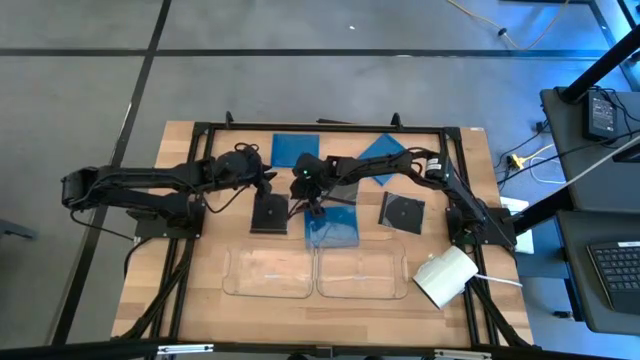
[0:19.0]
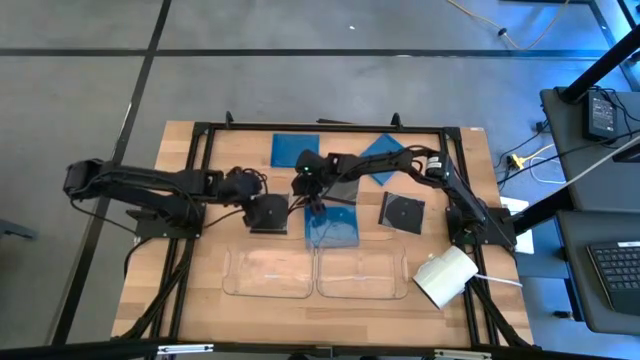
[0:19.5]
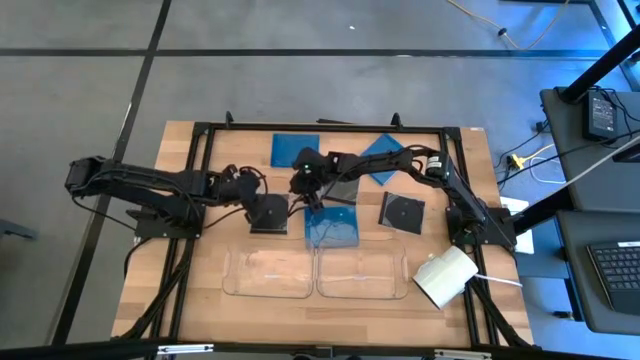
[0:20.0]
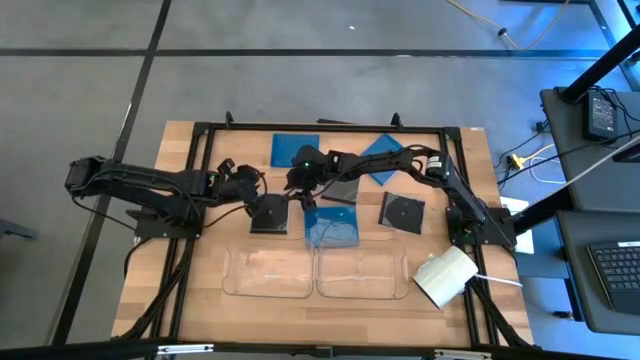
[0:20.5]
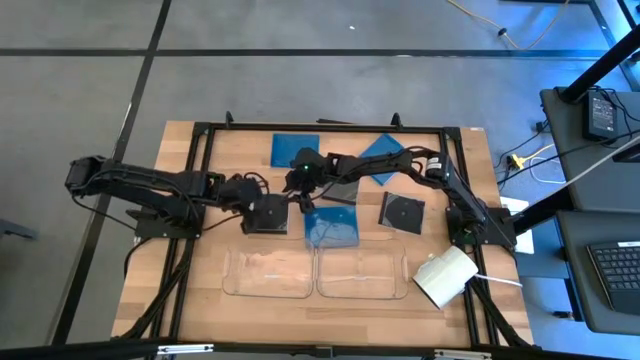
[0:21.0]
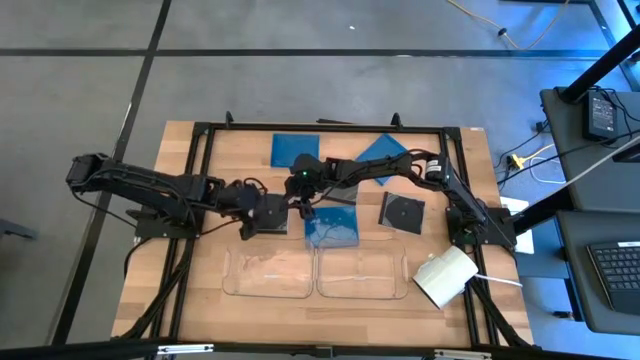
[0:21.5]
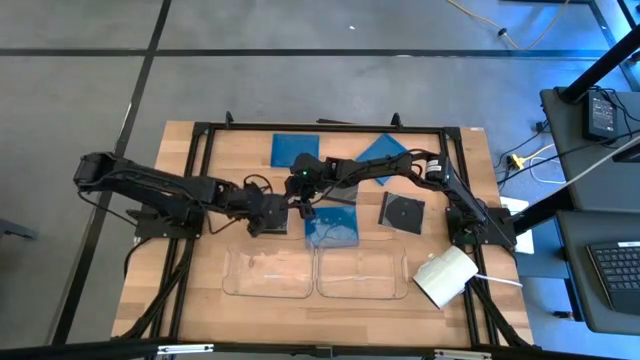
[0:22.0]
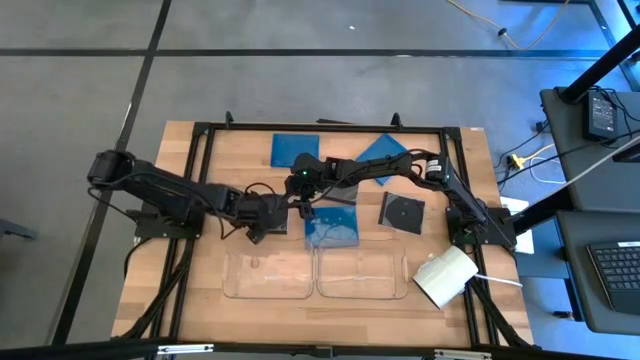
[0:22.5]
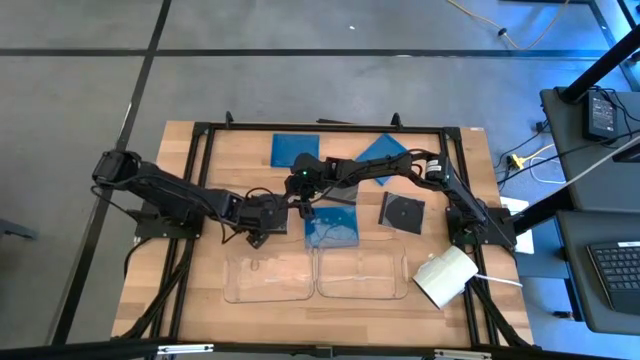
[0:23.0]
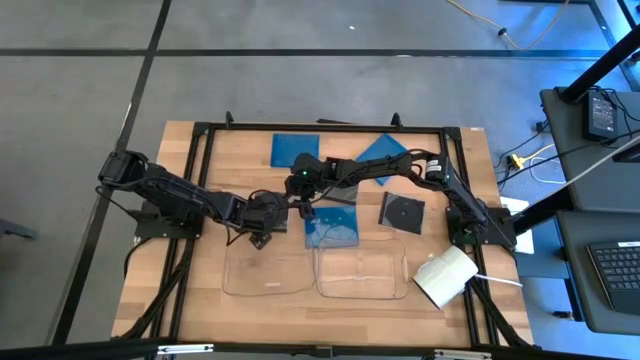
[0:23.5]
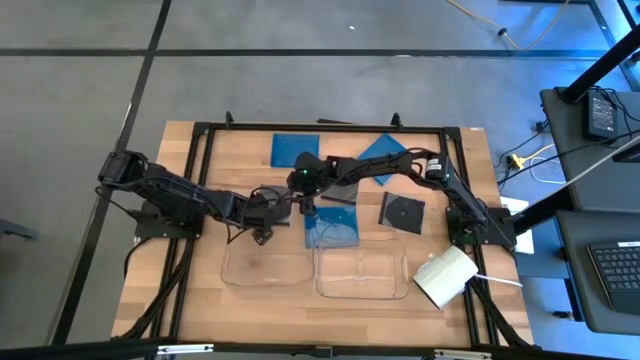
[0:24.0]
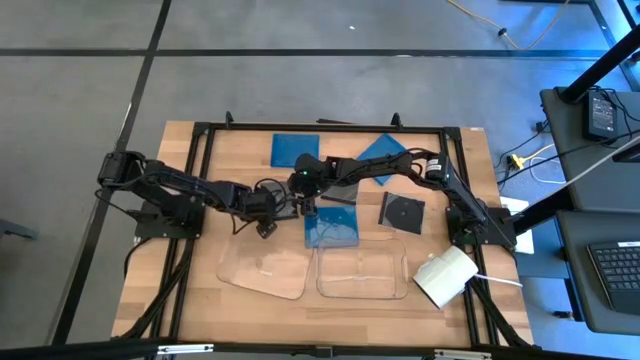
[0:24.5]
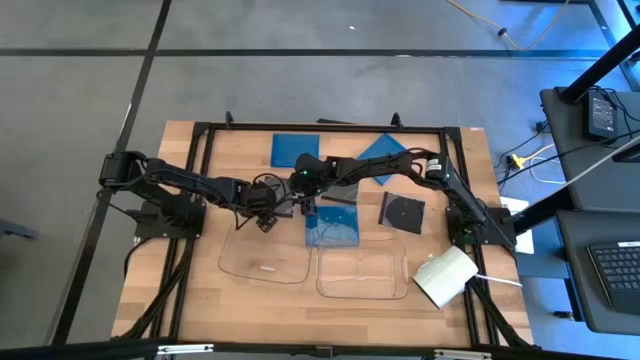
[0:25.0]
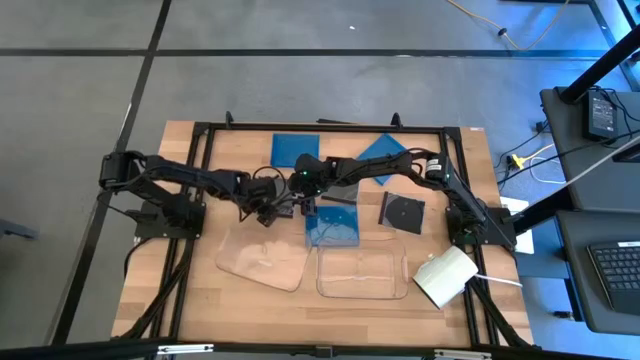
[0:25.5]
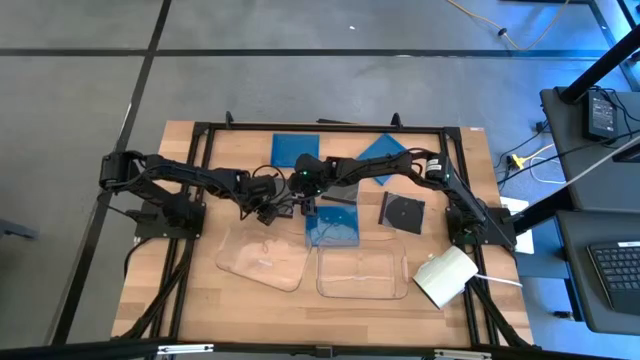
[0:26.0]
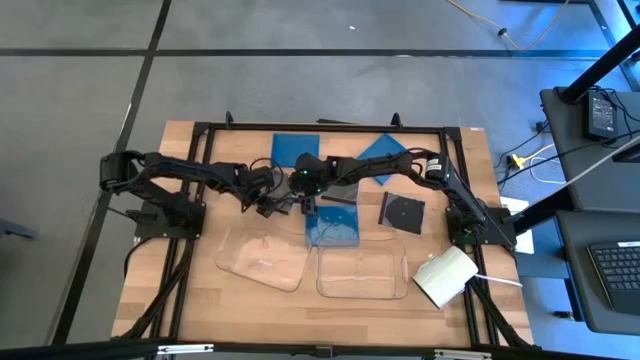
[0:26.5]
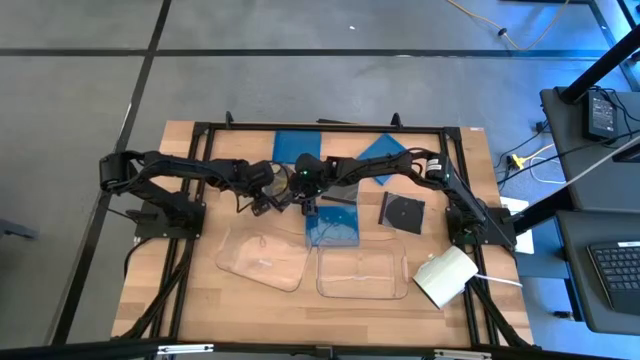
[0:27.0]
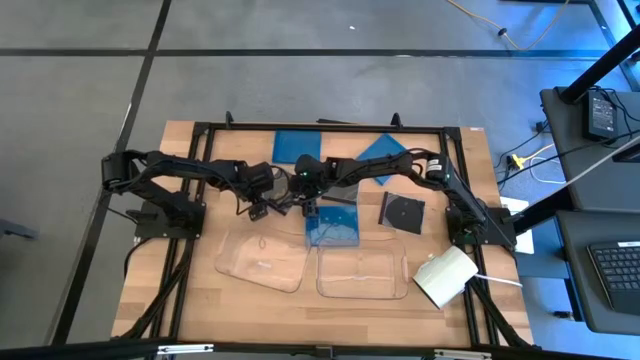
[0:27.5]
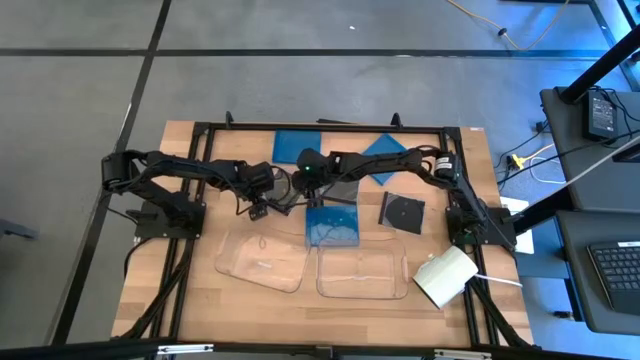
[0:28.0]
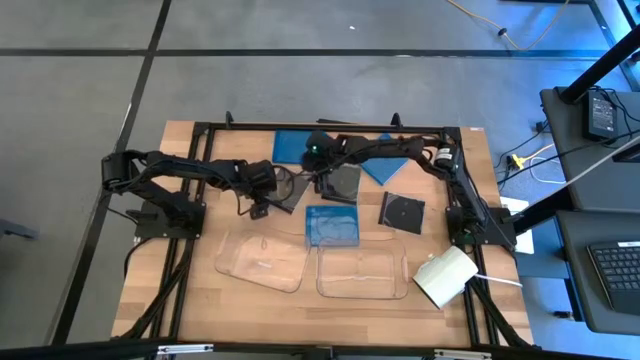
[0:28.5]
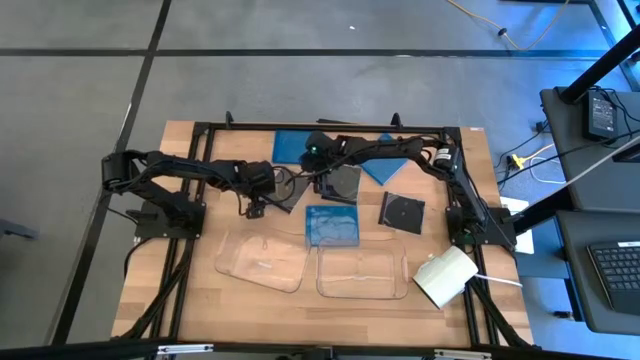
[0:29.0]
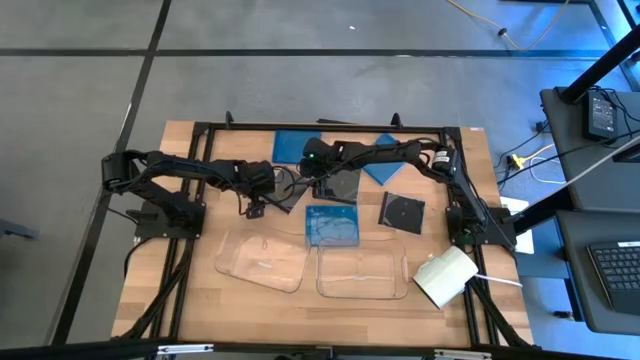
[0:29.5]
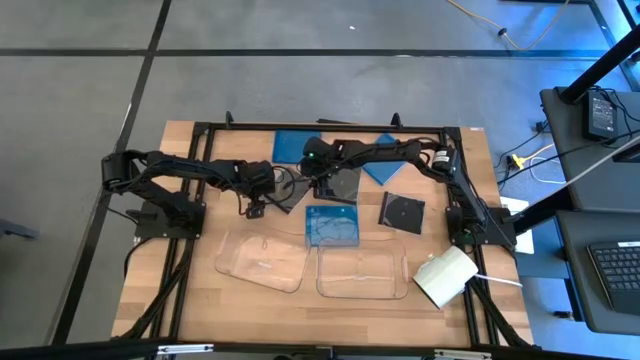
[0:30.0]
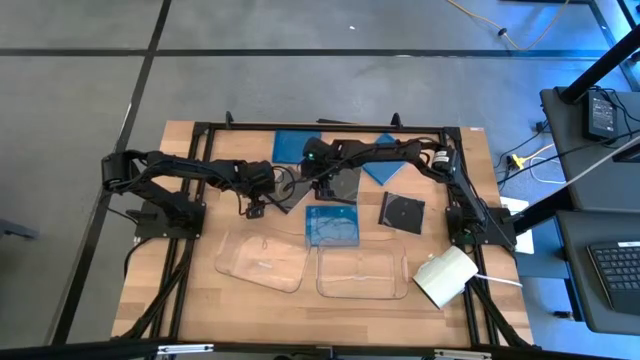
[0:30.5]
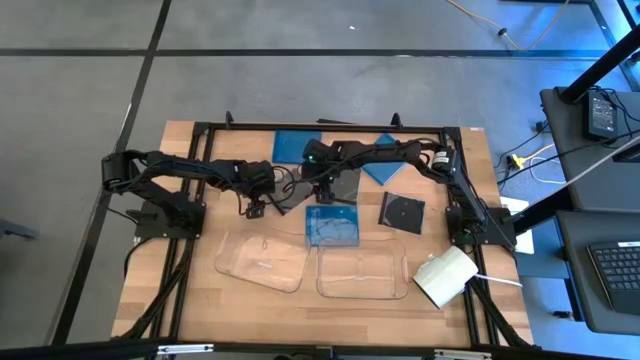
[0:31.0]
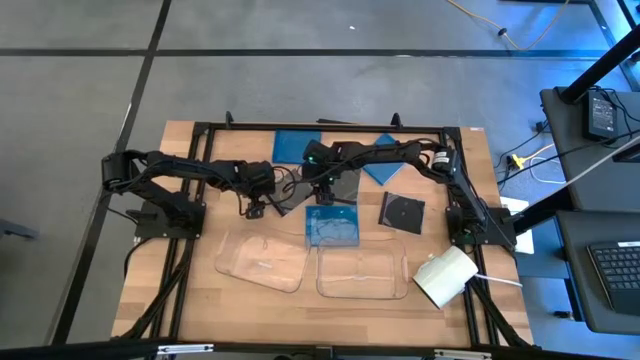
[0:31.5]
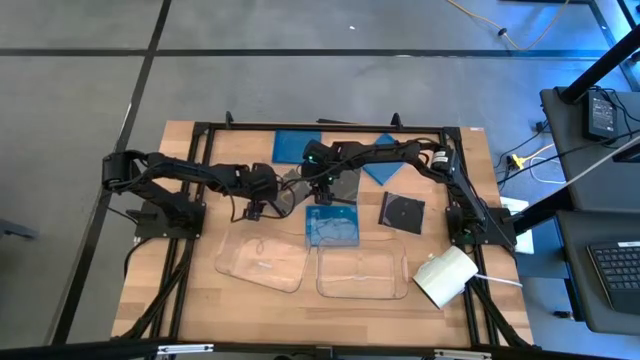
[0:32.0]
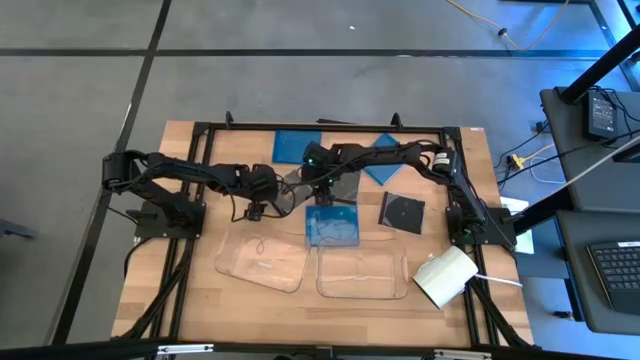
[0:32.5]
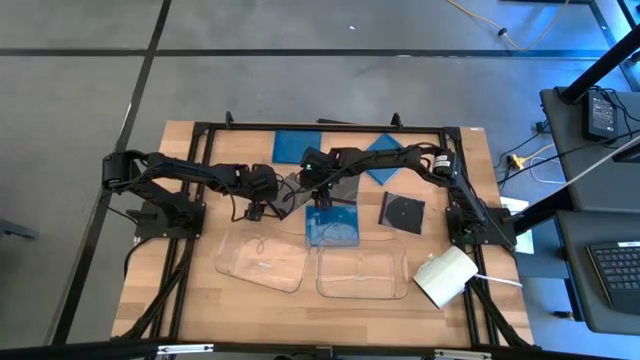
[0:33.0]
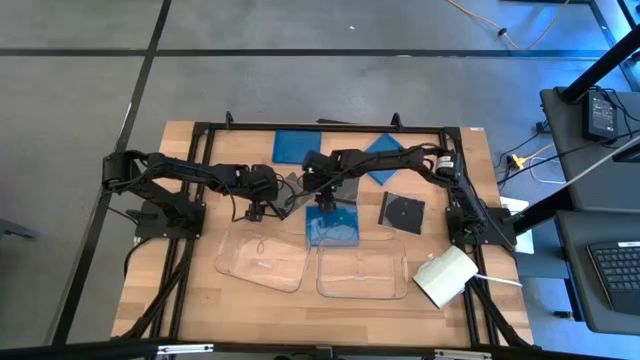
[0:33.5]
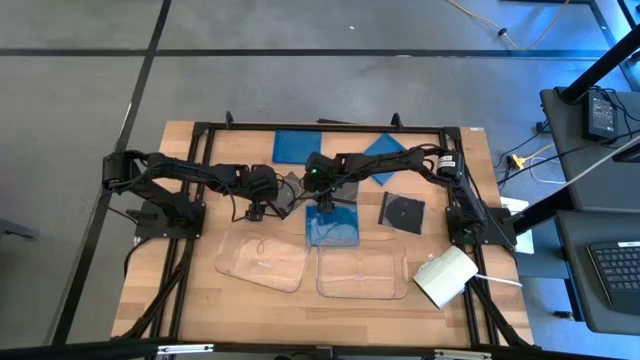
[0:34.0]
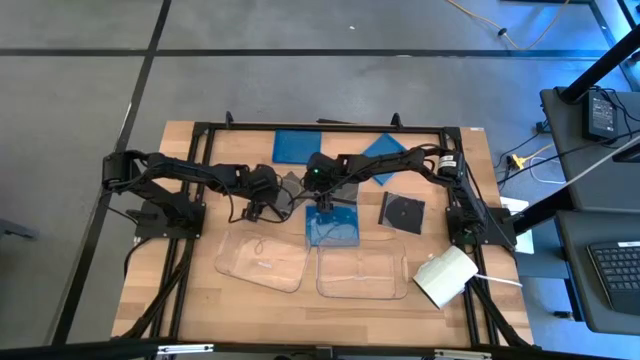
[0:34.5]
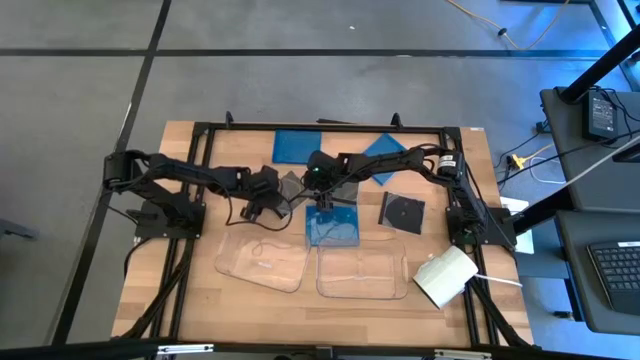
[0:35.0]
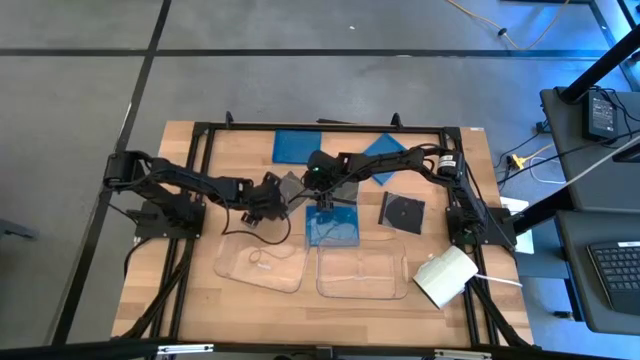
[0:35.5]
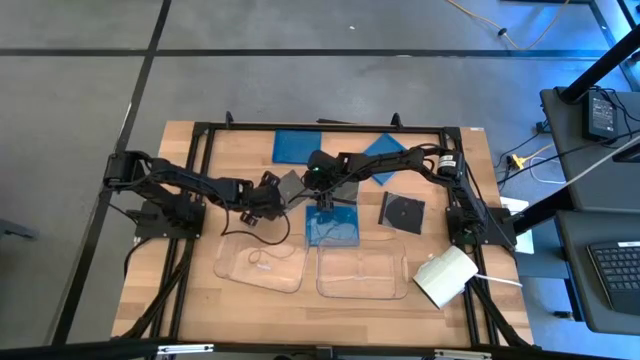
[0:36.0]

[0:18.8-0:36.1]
Task: Pick & place jewel cases by type
Put the left black CD case into the left transparent bin
